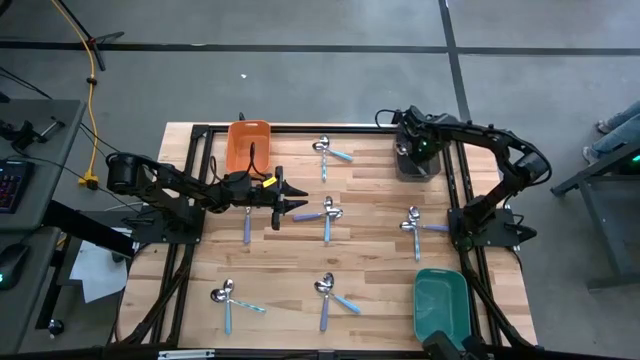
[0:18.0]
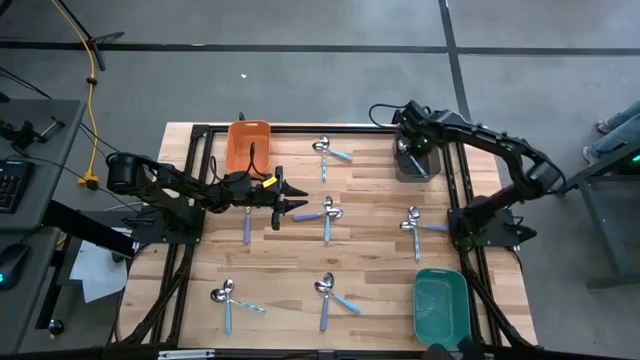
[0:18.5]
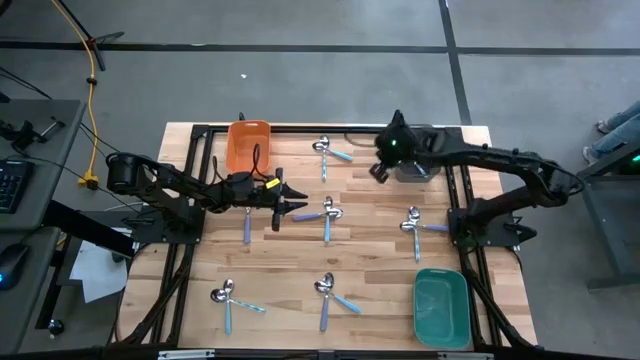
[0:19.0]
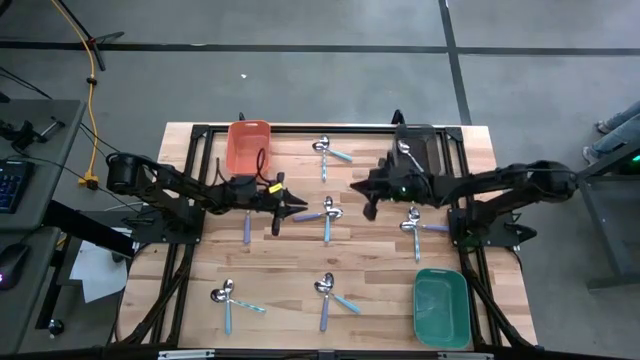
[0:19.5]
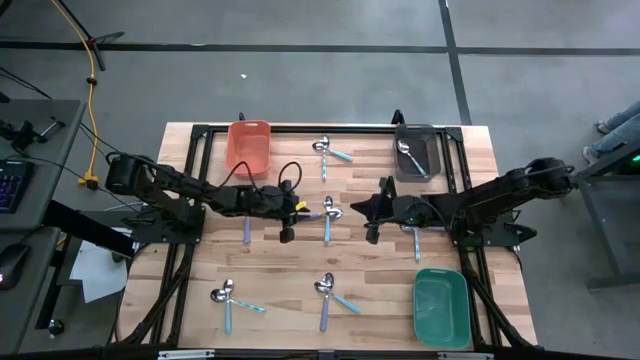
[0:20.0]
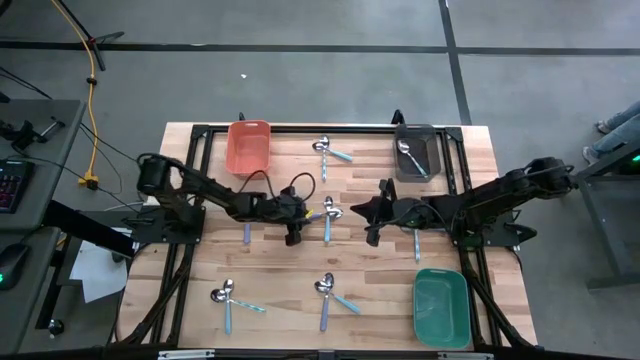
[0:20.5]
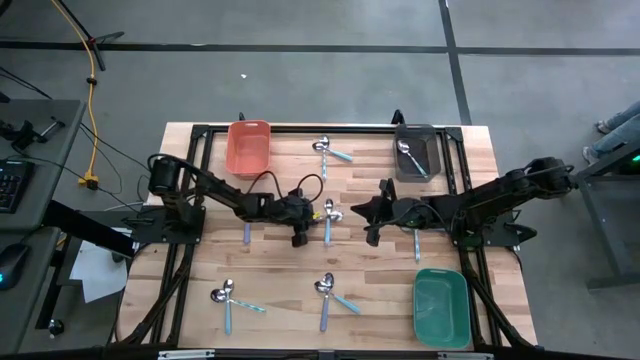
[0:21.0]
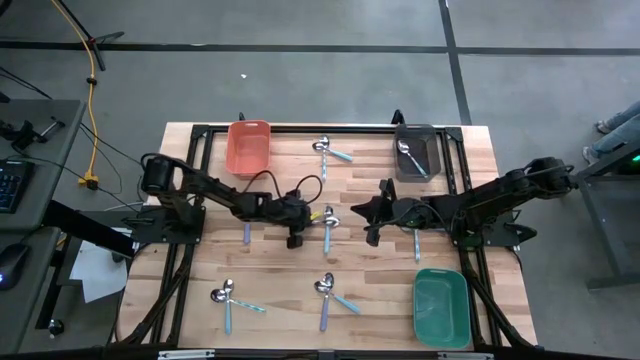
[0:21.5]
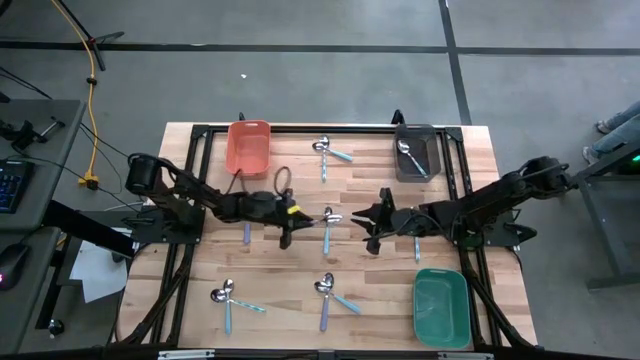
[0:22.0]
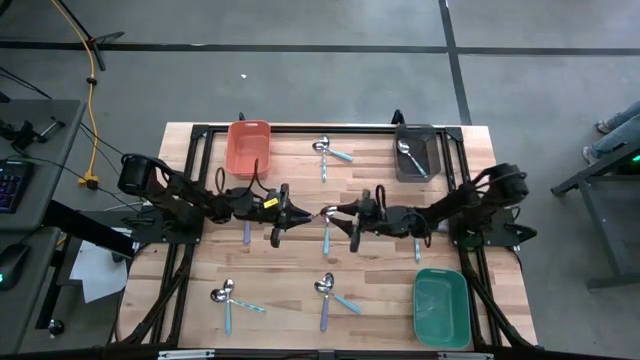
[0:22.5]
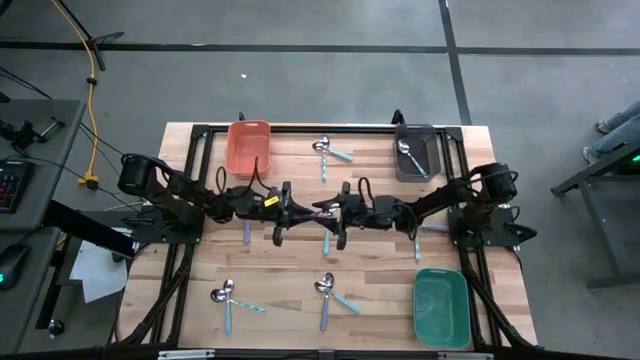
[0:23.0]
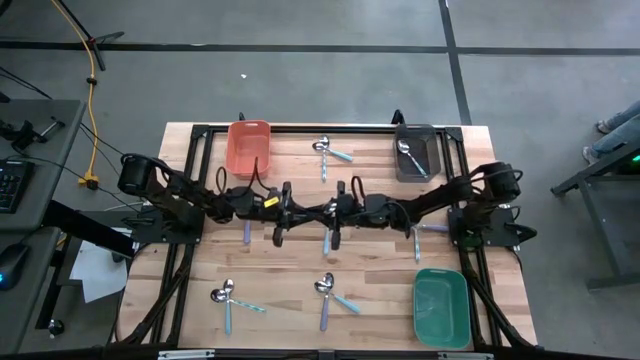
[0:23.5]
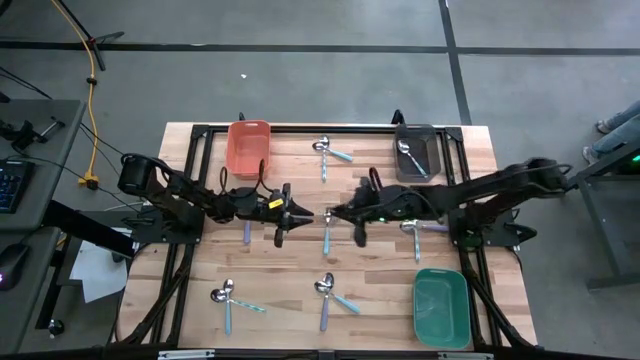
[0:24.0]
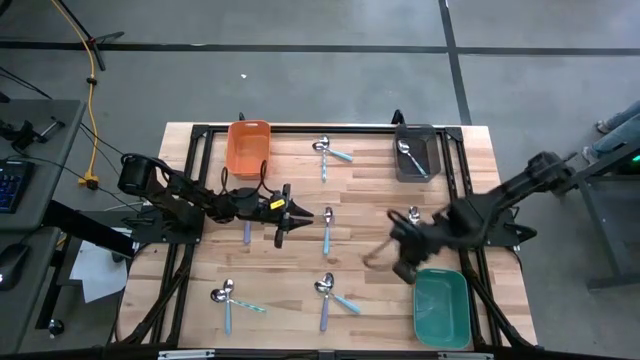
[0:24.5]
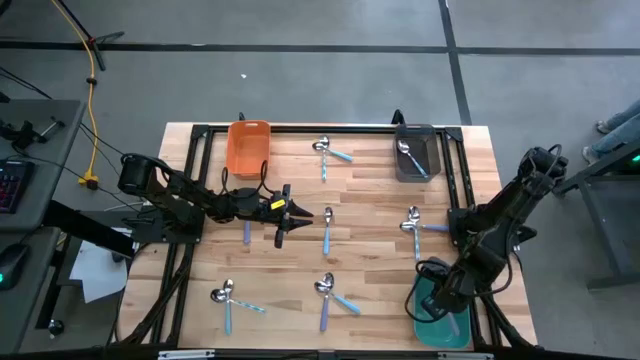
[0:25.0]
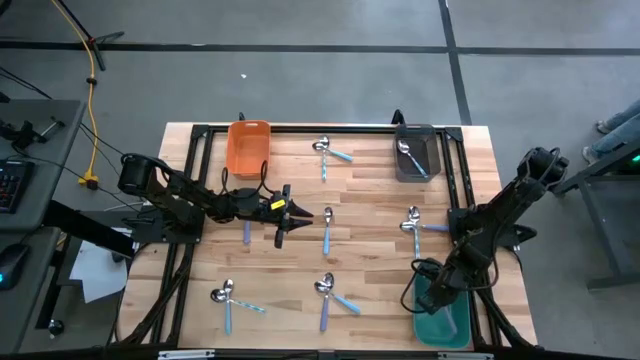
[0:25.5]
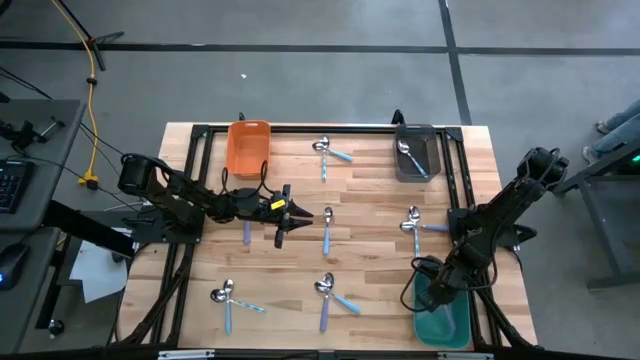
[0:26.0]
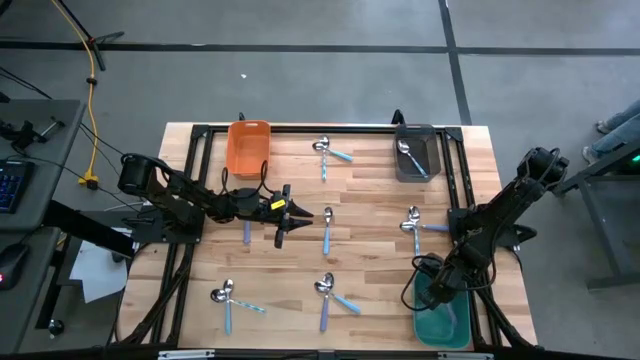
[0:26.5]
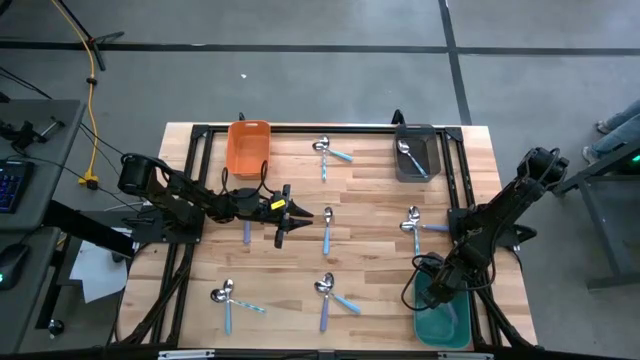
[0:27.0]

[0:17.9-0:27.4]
Task: Sort silverware by color (type)
Put the purple spoon into the green bin

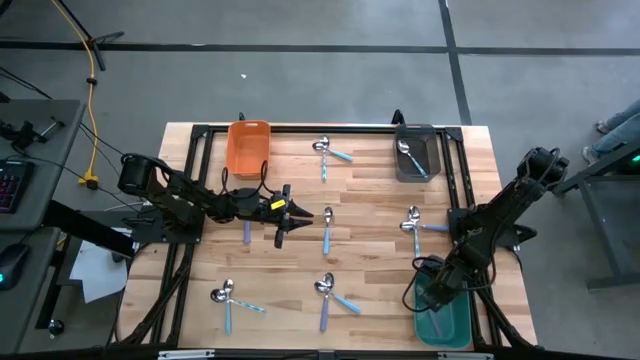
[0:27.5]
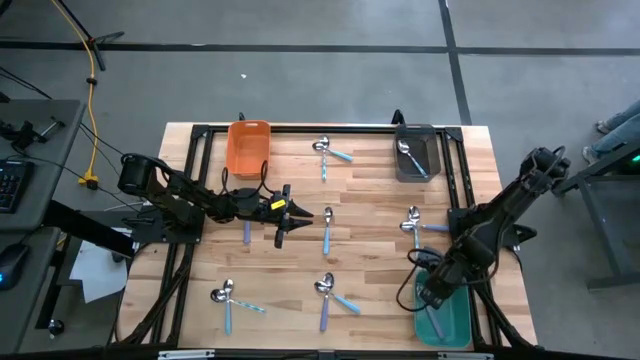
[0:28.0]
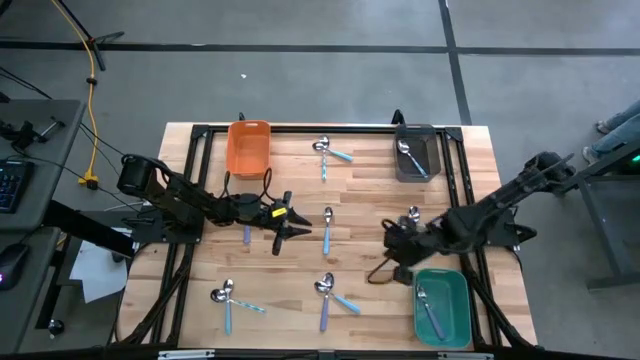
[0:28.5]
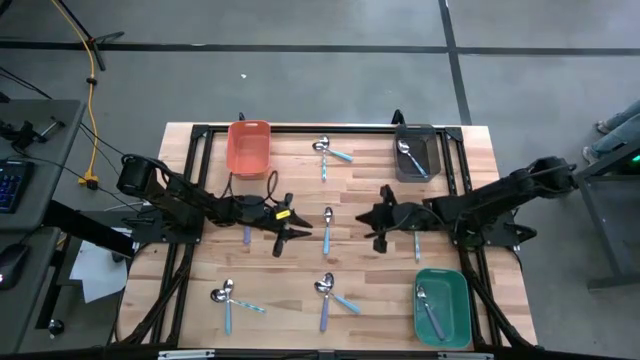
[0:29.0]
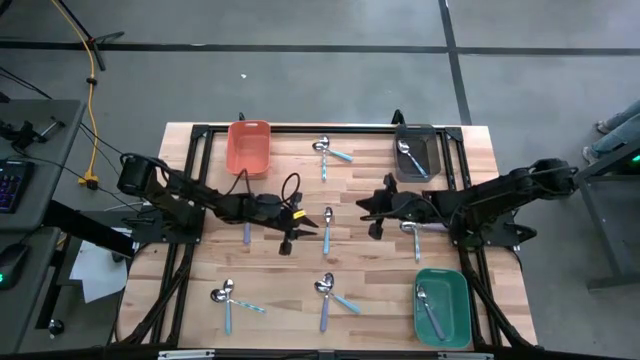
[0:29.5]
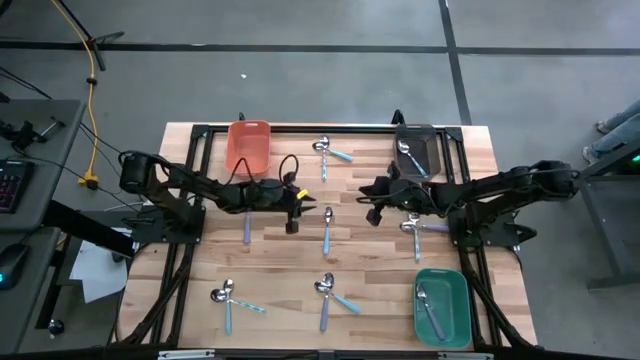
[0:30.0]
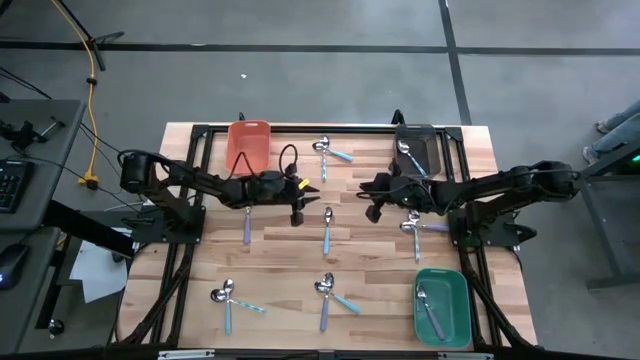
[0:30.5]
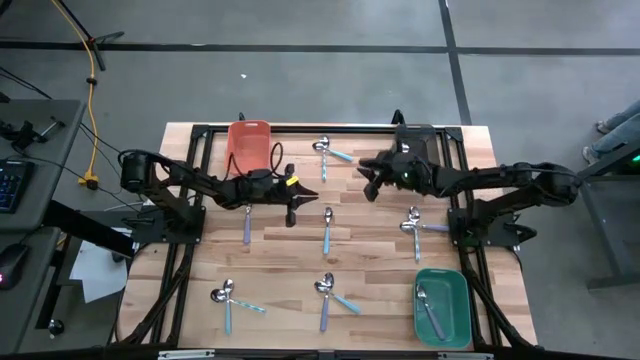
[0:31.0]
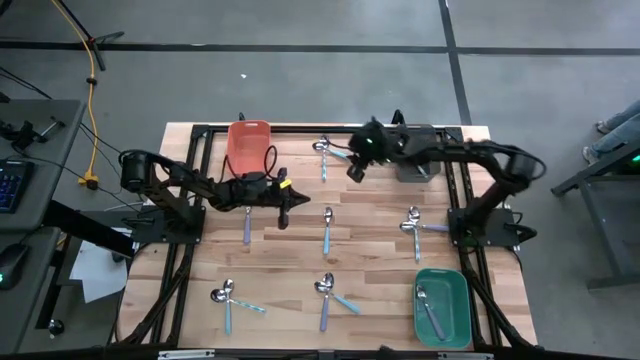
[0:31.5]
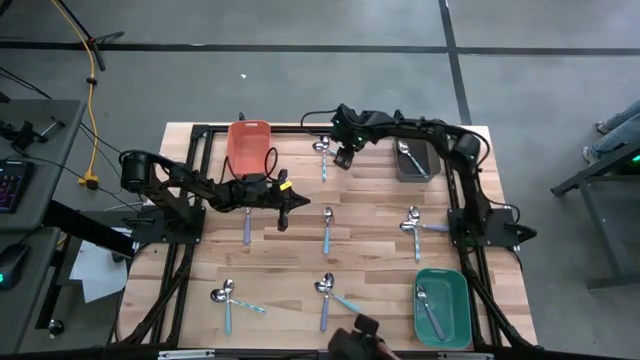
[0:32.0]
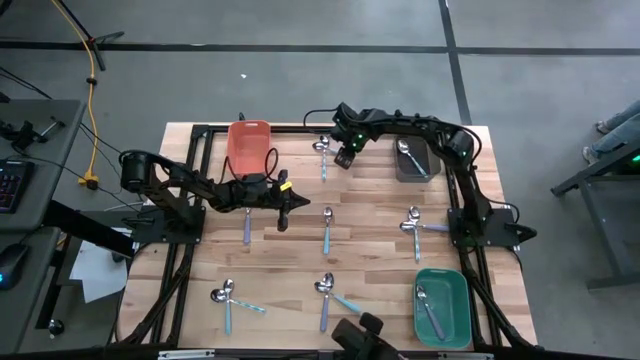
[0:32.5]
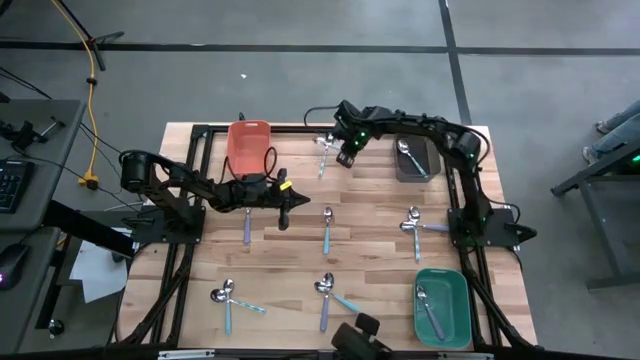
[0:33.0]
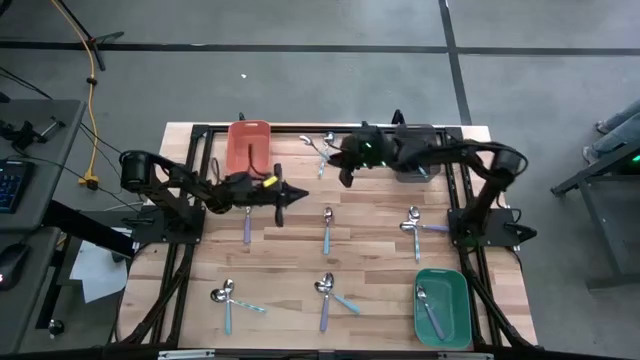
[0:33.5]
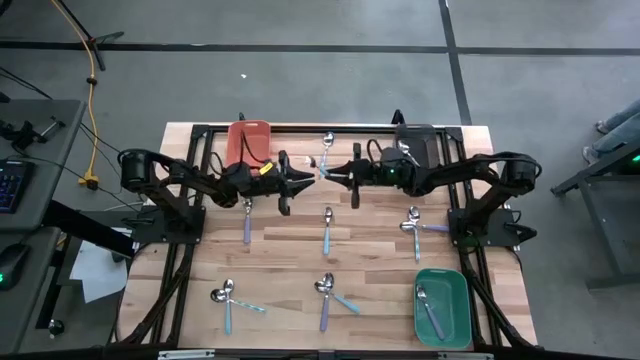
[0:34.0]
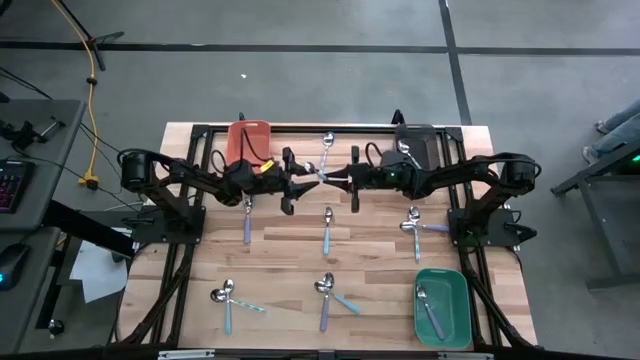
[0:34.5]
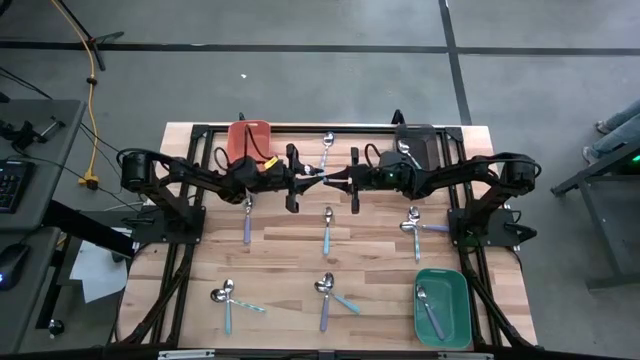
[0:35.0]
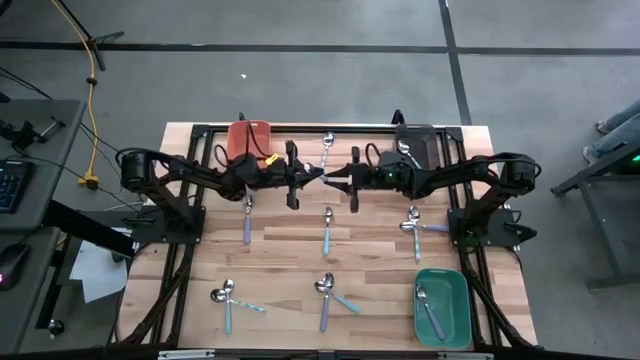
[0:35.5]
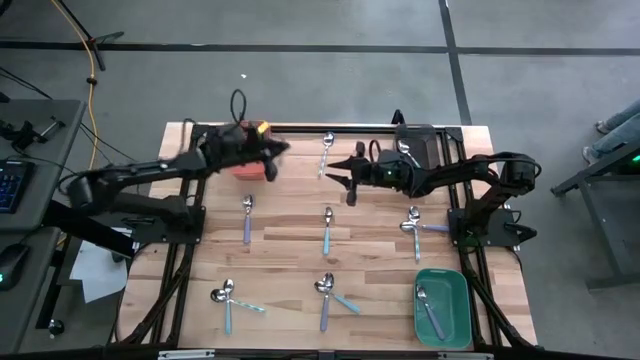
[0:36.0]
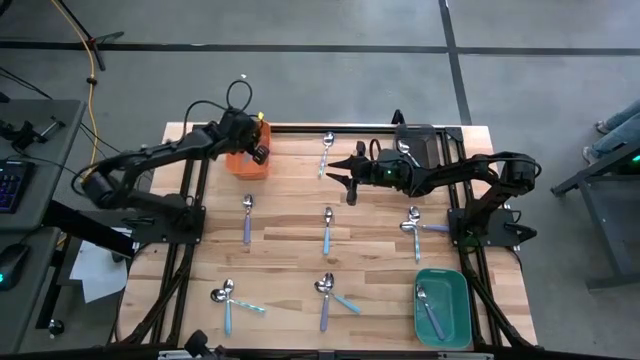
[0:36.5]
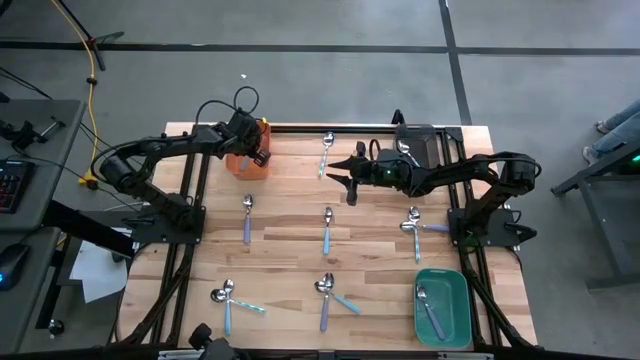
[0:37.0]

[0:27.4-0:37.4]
Put the blue spoon into the orange bin

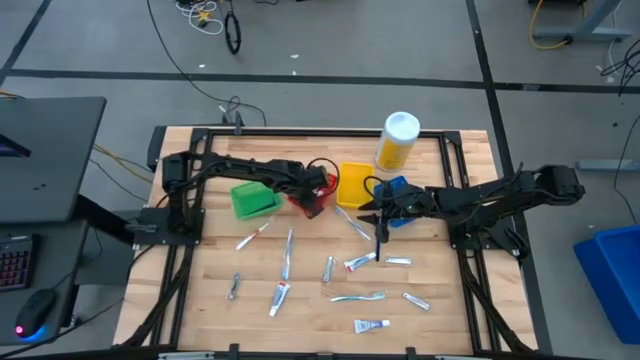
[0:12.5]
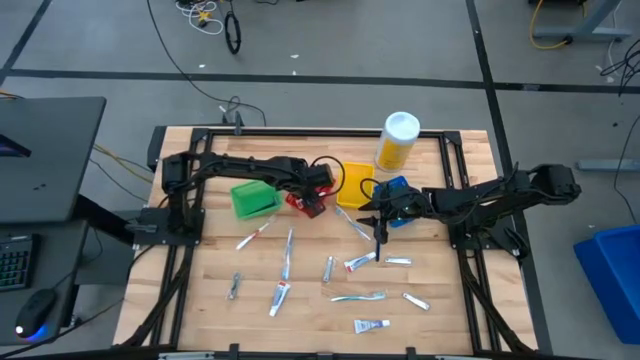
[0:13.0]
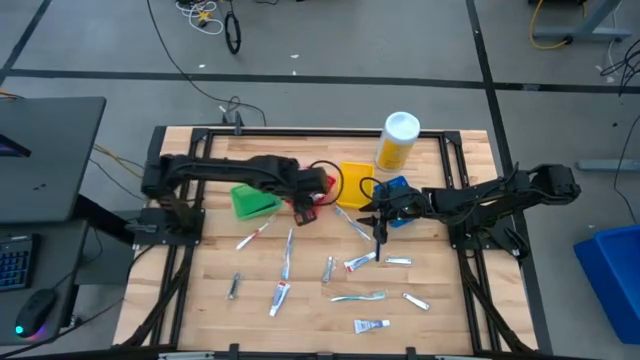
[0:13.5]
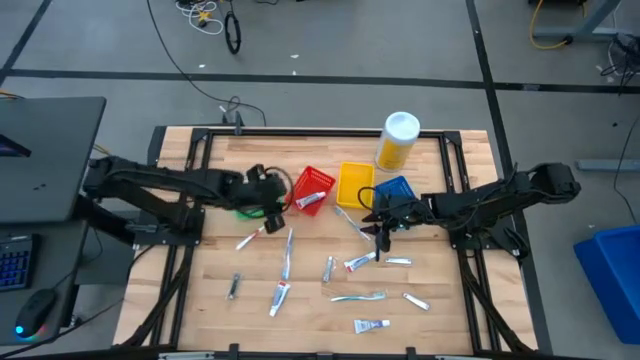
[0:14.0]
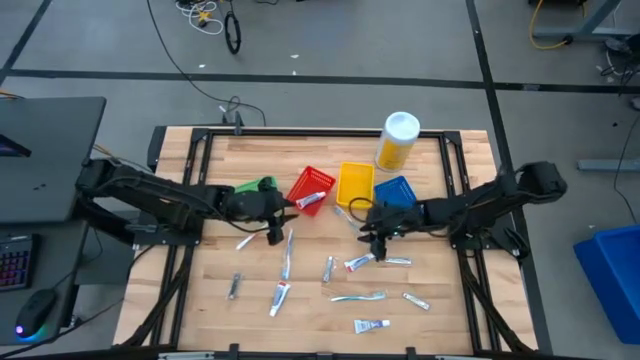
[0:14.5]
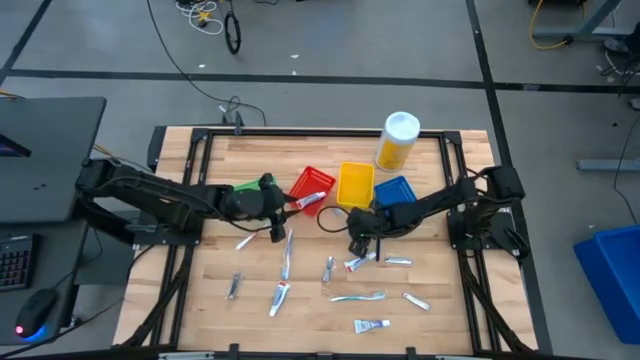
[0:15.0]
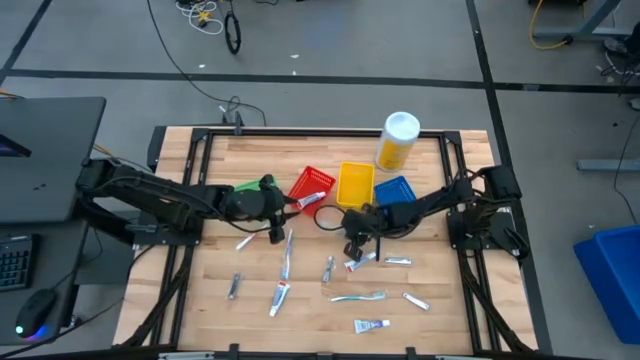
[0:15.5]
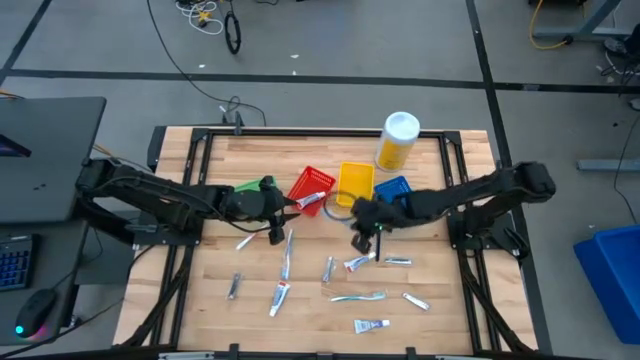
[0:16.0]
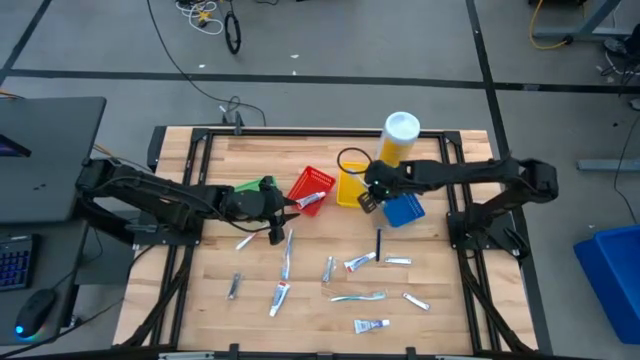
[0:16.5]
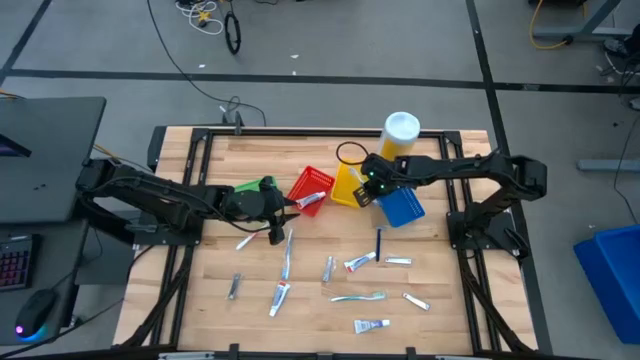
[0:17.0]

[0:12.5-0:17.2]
Task: Pick & Place Travel size toiletries
Put the blue toothbrush into the yellow bin
